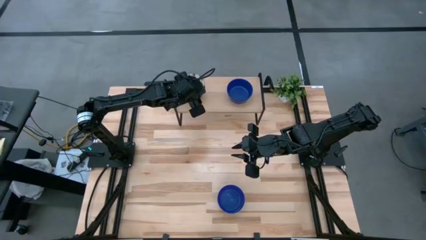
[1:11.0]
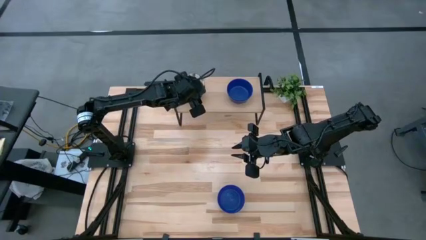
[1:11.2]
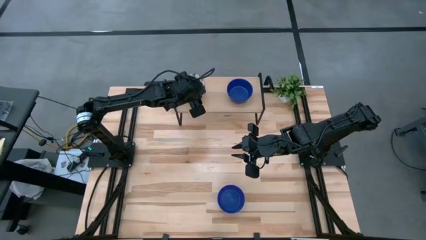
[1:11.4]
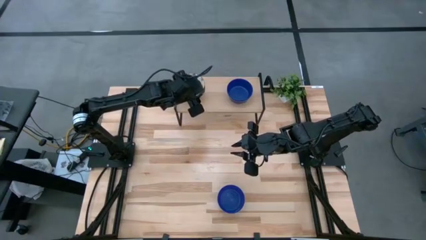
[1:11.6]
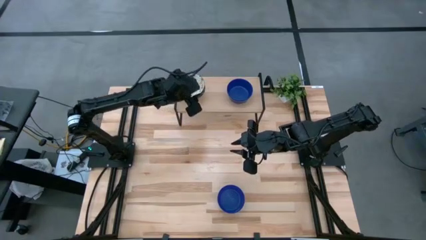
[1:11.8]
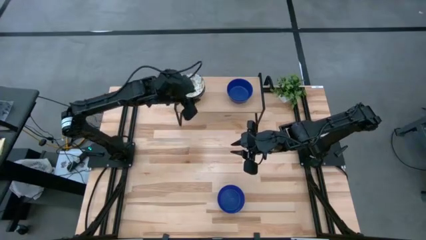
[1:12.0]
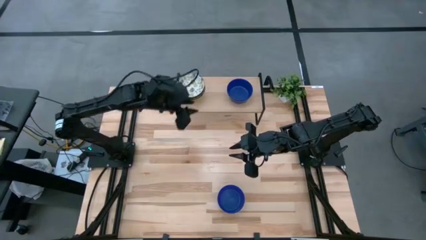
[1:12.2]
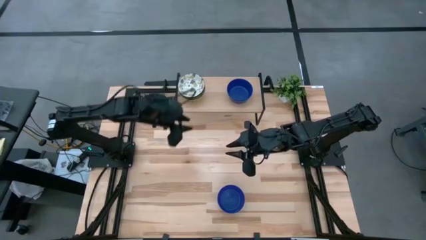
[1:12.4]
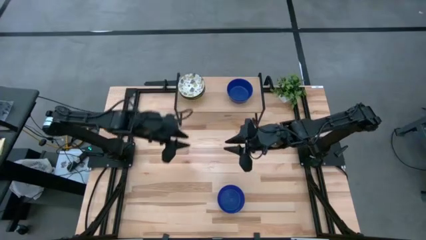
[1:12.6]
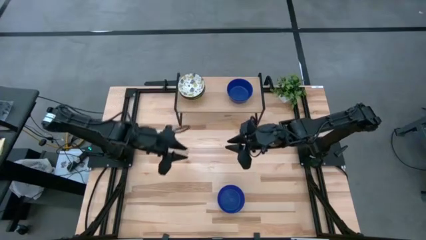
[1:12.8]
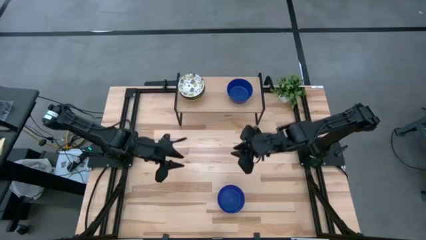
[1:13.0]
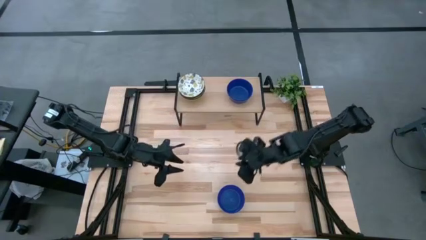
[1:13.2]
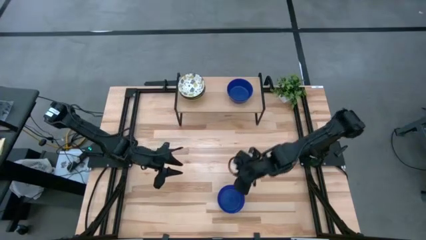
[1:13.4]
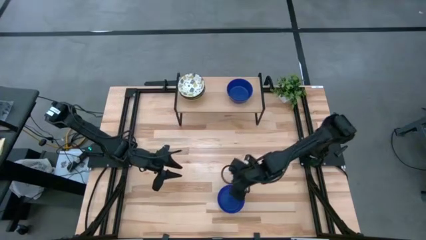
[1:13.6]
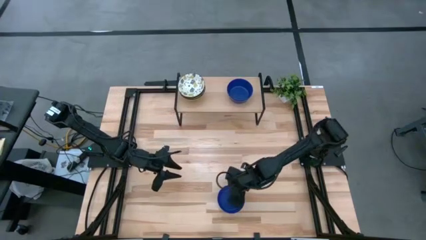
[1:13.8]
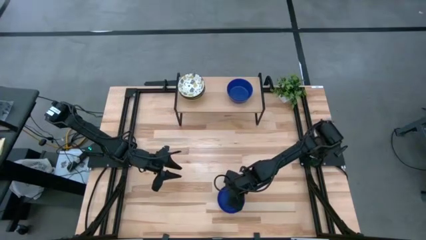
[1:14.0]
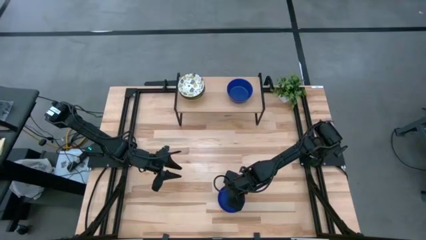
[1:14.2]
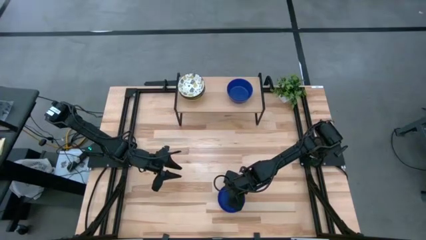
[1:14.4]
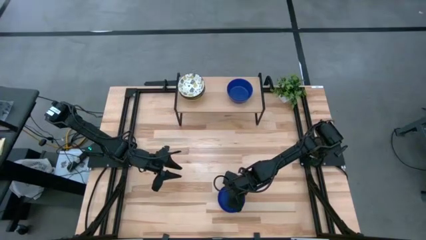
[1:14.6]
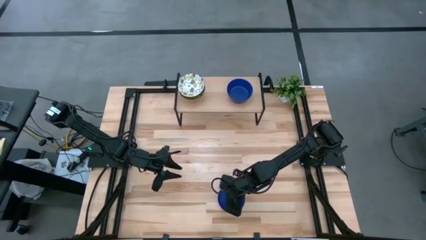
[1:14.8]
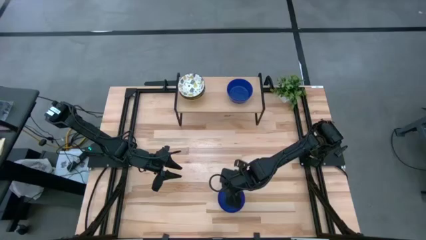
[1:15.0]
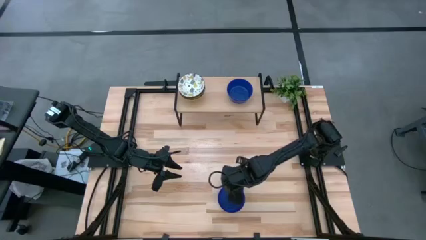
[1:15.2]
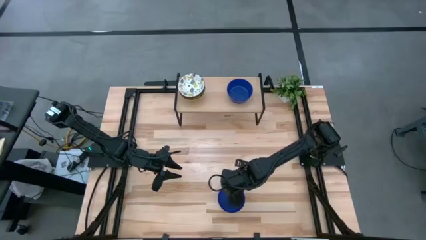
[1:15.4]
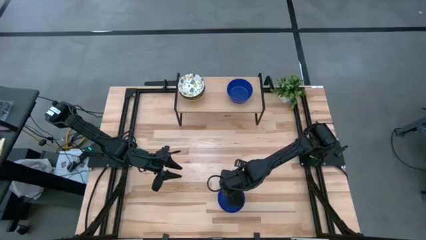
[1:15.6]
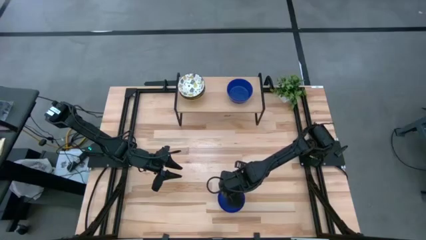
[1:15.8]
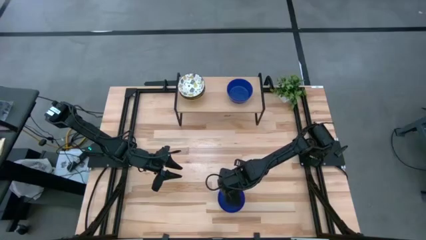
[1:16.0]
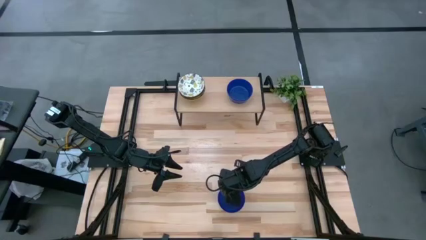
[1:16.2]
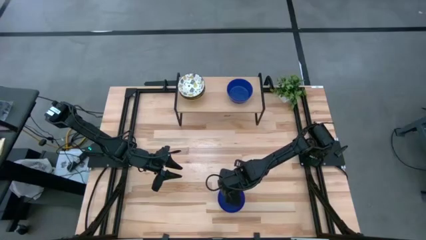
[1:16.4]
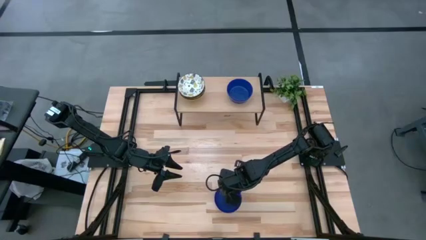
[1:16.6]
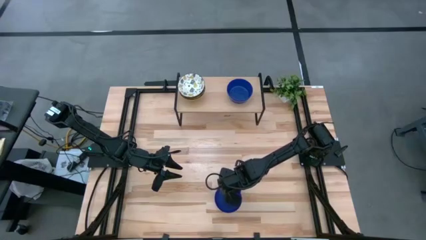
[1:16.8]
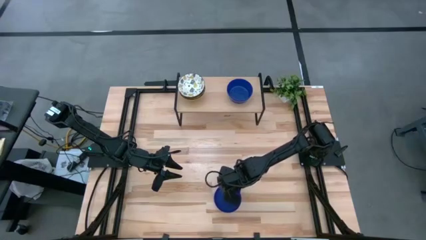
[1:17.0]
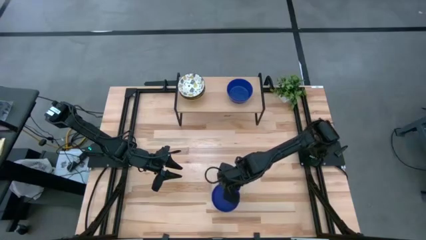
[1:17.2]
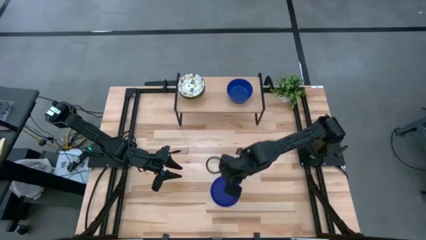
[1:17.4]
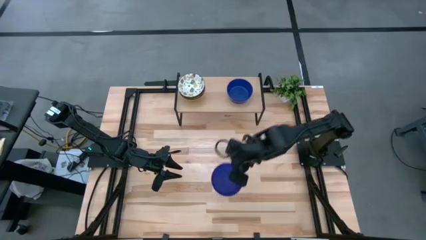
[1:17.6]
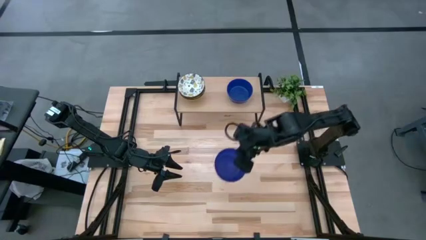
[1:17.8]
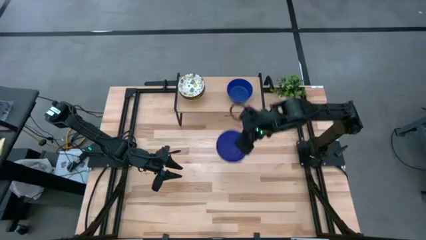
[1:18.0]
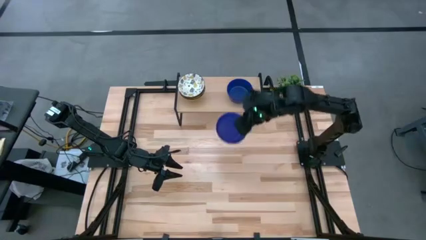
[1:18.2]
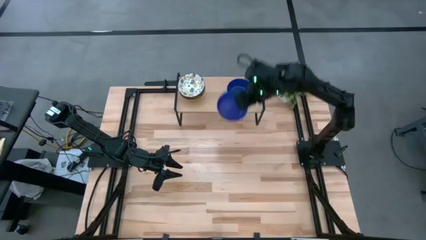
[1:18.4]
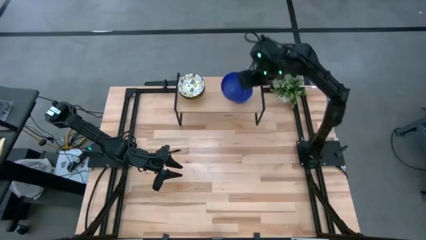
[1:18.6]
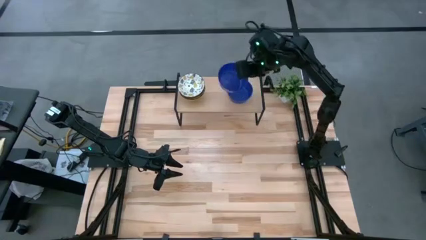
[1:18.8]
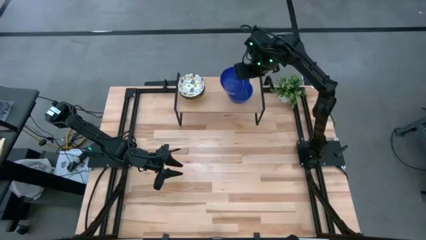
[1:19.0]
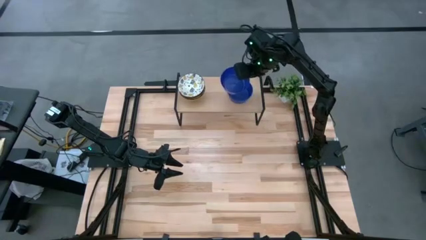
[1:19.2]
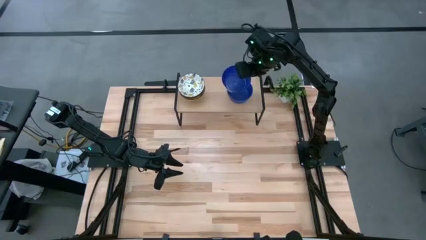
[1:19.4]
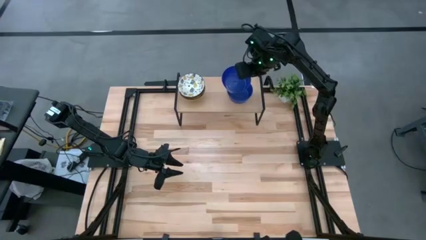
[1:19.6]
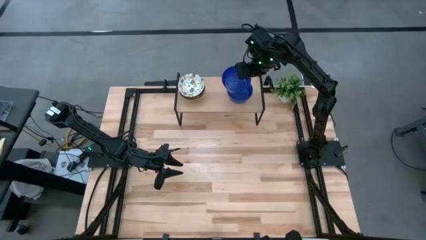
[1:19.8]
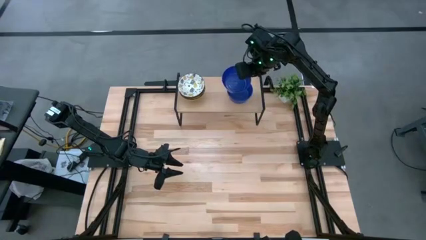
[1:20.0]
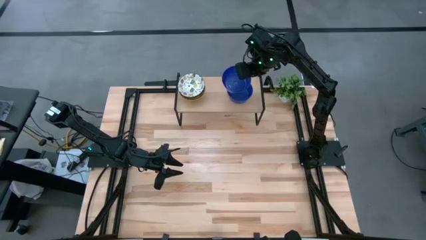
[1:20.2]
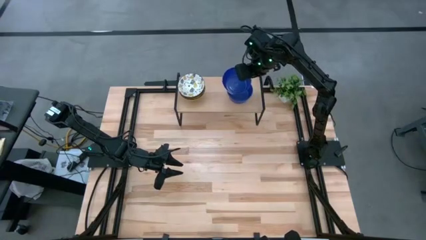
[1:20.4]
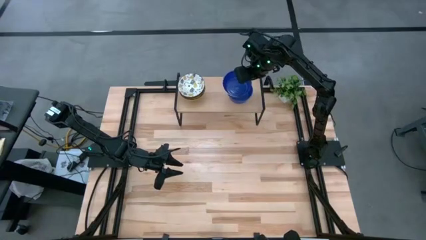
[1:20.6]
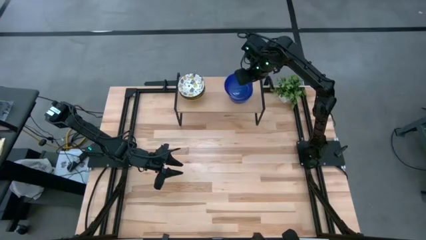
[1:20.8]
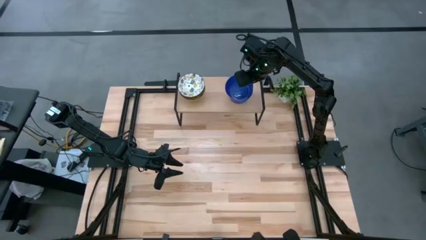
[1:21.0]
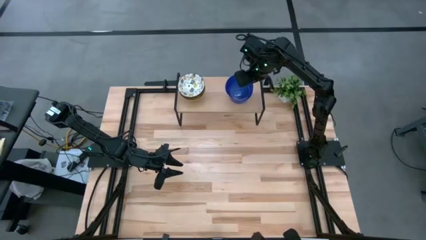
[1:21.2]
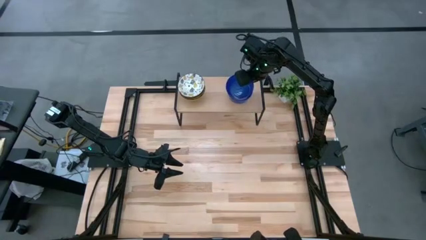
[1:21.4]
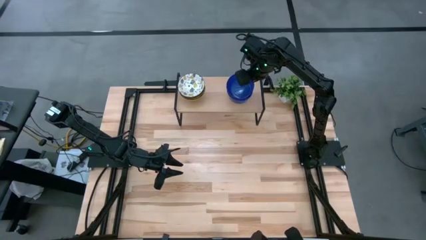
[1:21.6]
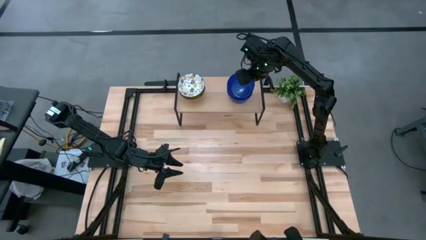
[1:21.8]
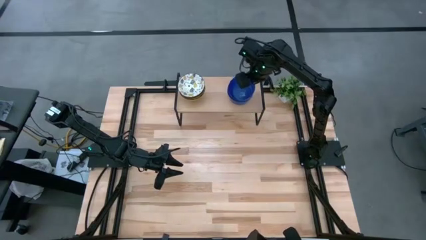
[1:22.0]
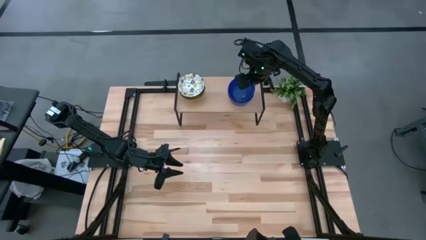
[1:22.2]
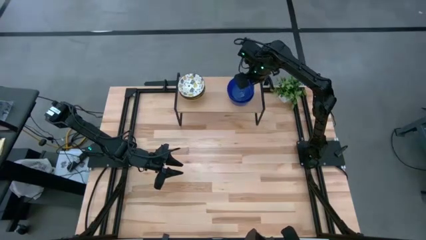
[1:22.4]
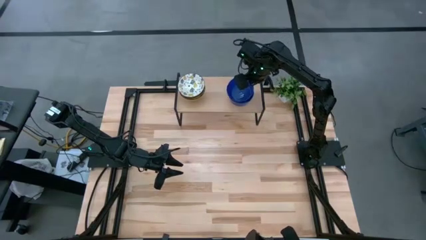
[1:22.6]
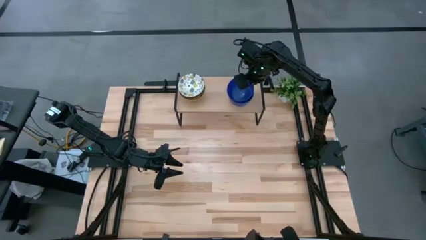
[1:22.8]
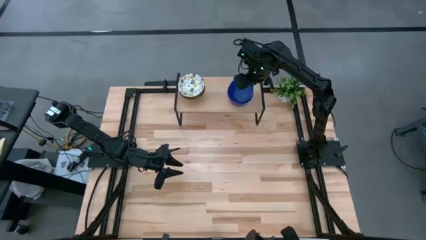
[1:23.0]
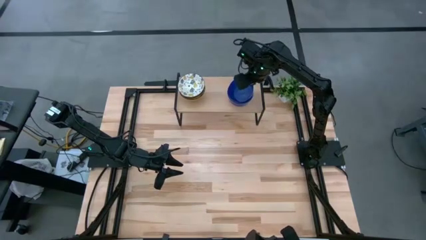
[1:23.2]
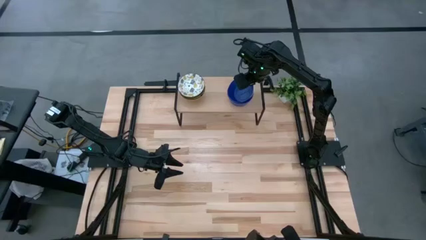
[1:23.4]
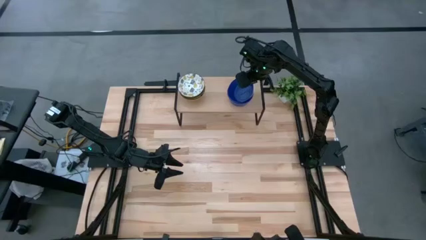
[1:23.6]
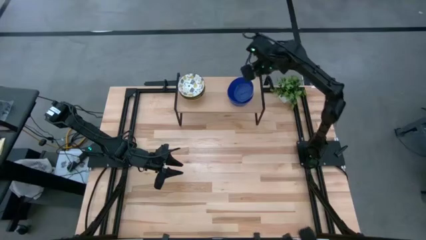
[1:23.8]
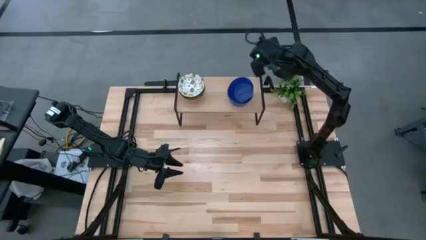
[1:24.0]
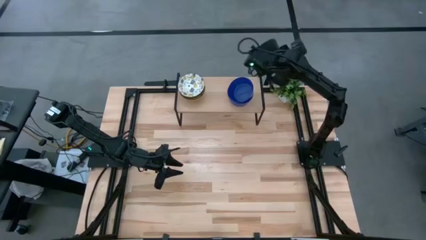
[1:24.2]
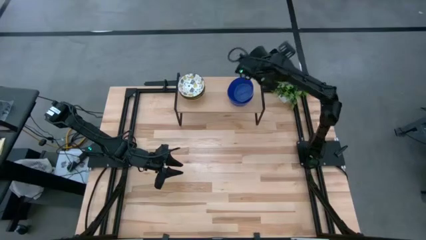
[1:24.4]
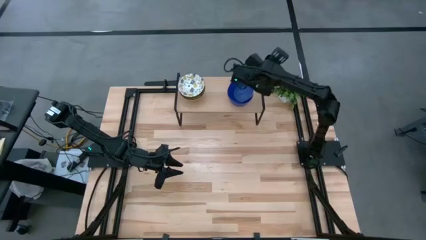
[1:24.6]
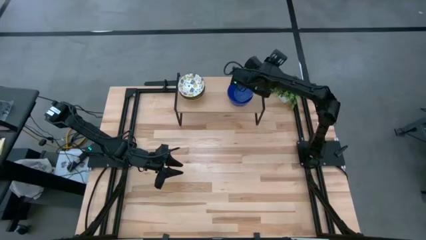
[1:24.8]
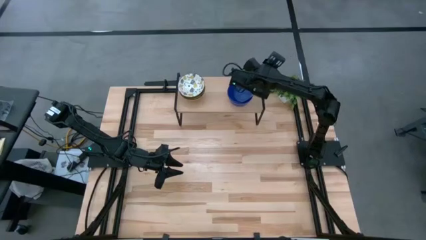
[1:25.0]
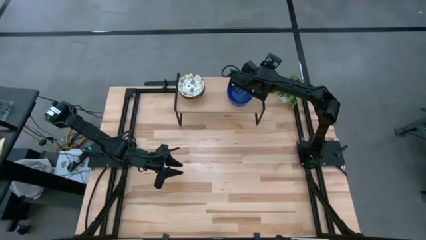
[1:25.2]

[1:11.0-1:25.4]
Task: Pick & Place Mini bowls
Stack the blue bowl on top of the blue bowl on the shelf

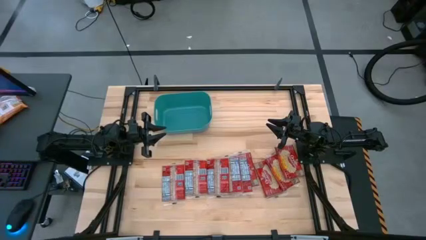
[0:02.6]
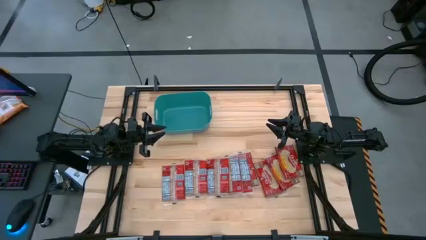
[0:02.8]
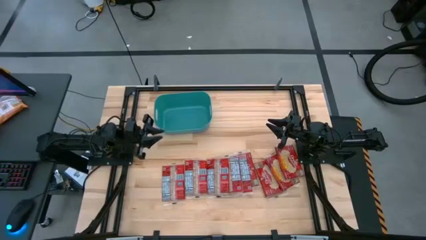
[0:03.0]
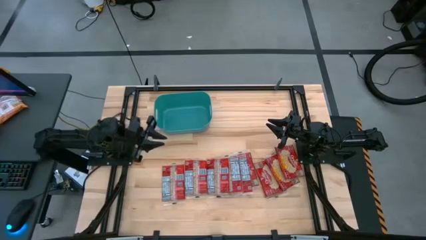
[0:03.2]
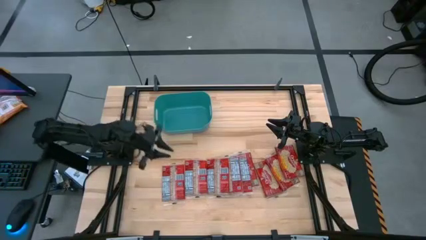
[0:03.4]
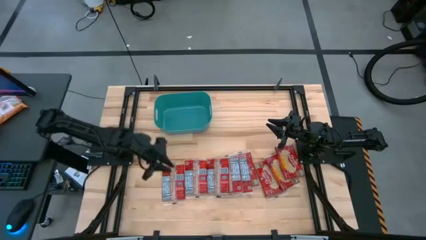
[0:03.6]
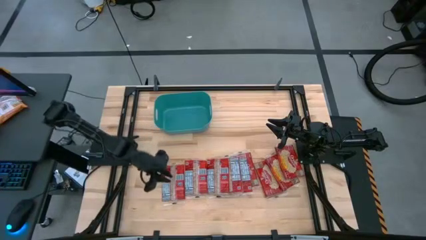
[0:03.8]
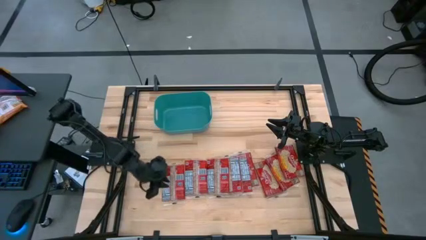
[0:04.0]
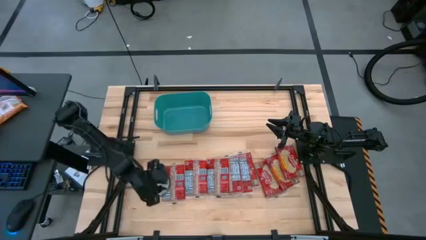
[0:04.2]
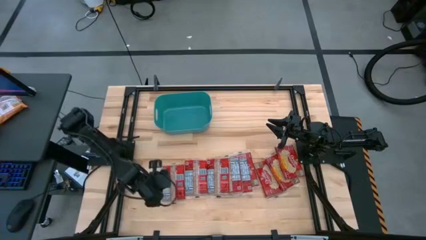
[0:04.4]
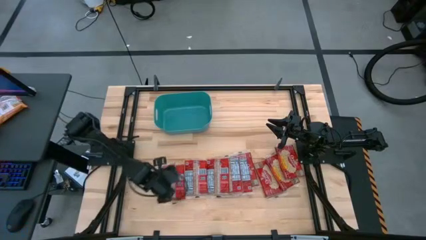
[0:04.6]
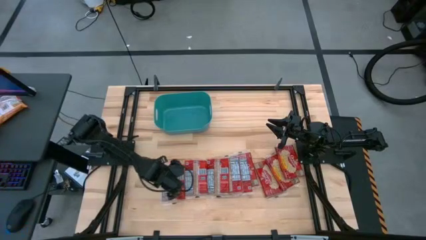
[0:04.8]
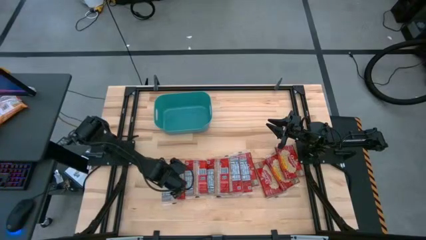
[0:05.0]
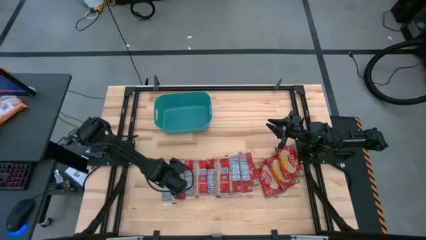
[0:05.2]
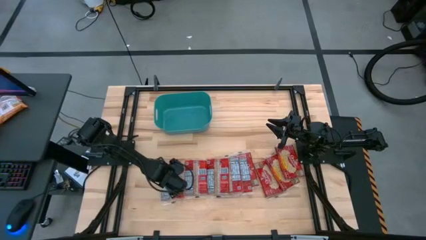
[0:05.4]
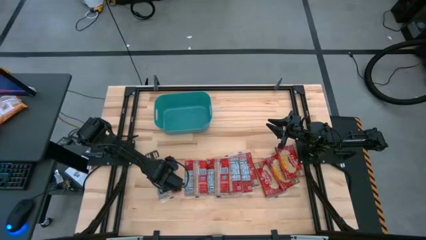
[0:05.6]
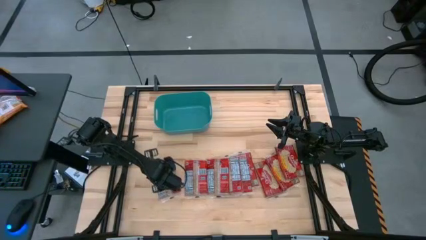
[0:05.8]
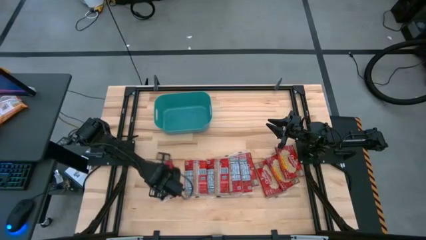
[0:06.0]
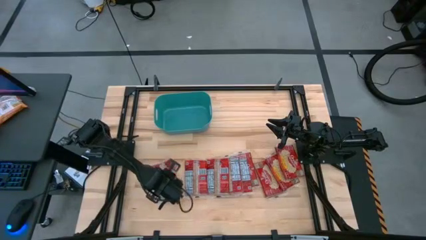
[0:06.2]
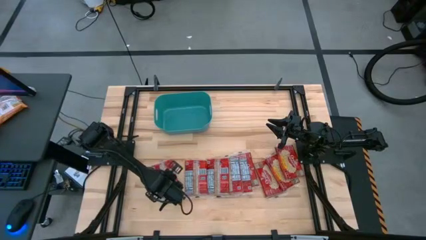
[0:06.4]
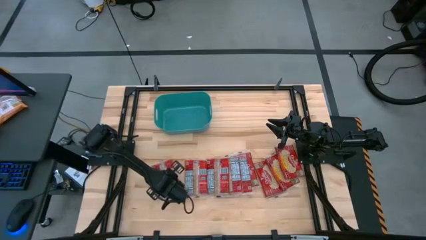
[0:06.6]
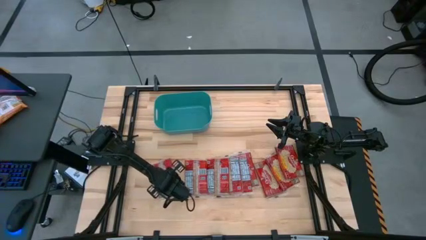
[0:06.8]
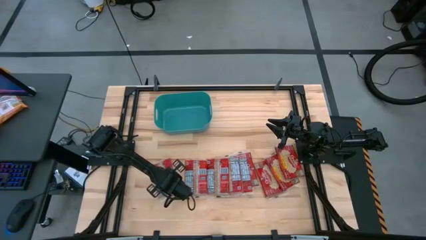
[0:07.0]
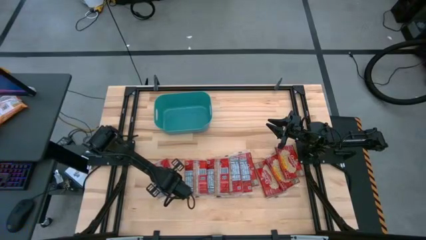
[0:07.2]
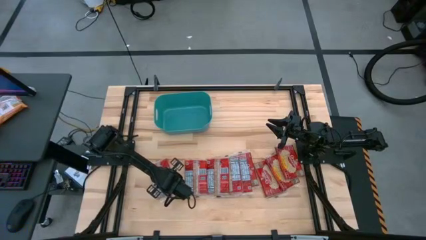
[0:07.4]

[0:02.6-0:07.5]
Task: Sort popcorn bags into baskets
Put the popcorn bag into the green bin
